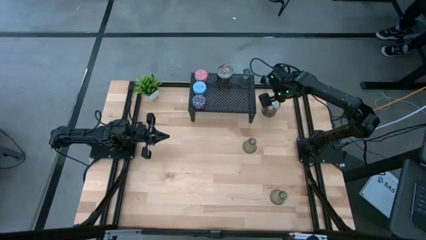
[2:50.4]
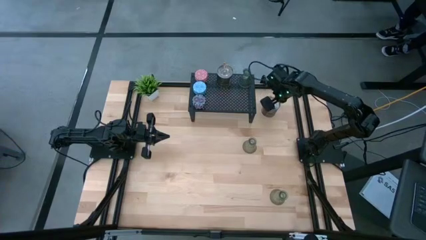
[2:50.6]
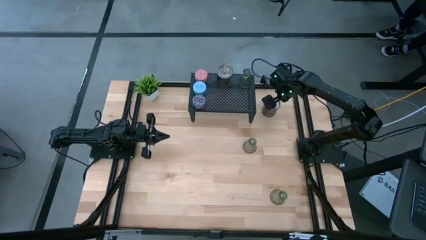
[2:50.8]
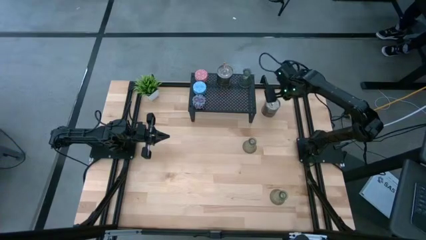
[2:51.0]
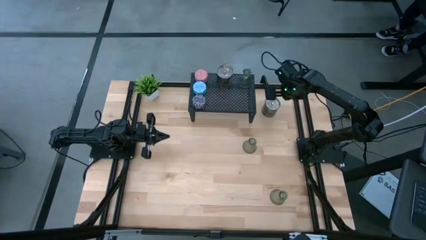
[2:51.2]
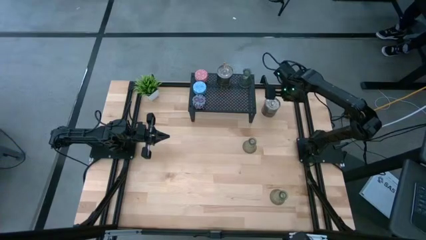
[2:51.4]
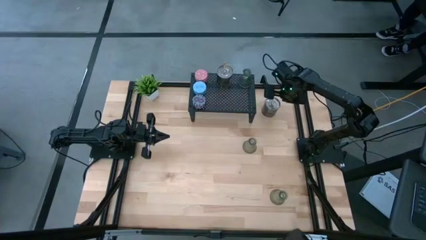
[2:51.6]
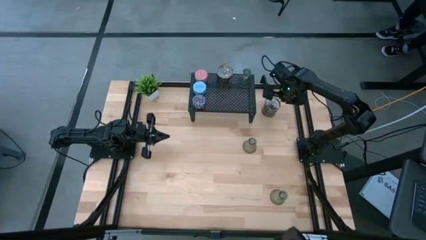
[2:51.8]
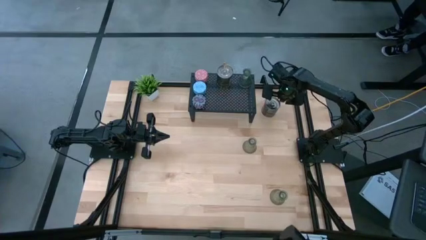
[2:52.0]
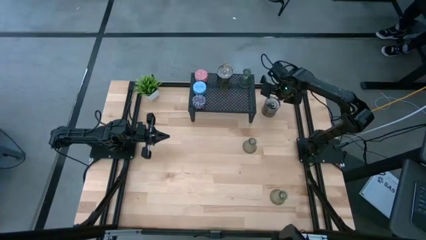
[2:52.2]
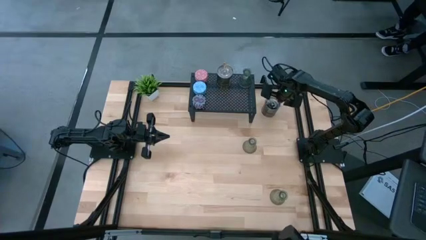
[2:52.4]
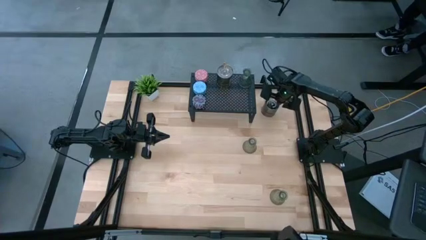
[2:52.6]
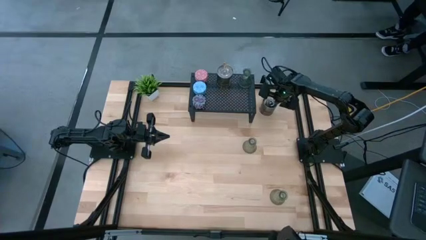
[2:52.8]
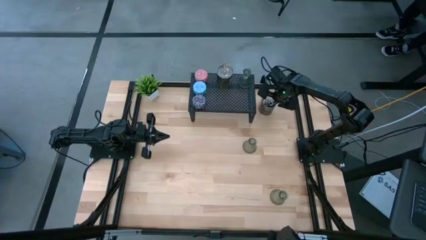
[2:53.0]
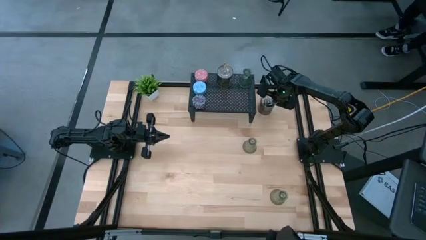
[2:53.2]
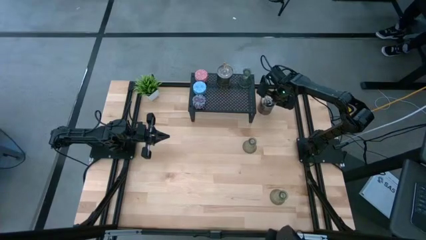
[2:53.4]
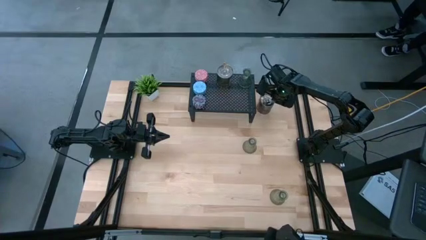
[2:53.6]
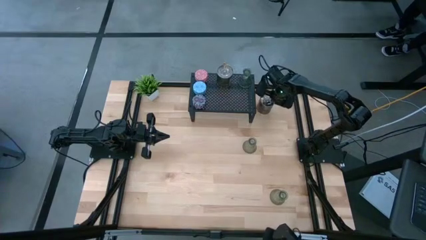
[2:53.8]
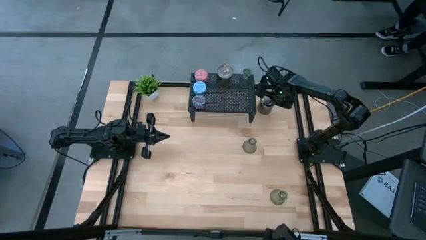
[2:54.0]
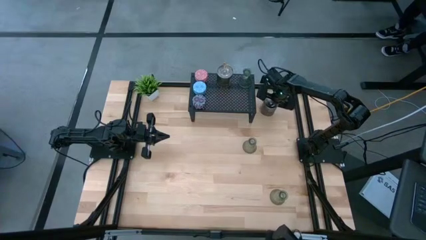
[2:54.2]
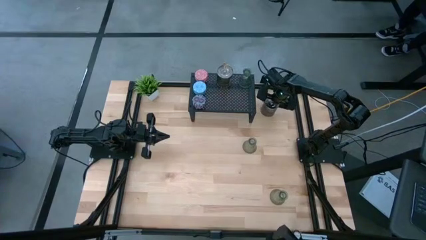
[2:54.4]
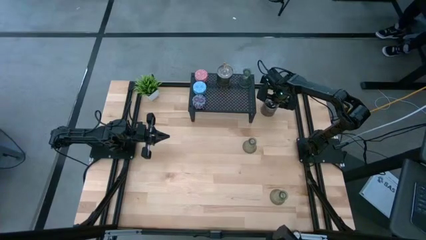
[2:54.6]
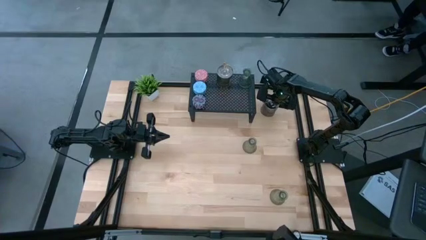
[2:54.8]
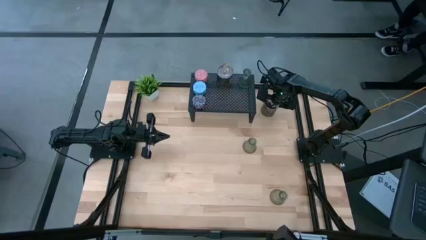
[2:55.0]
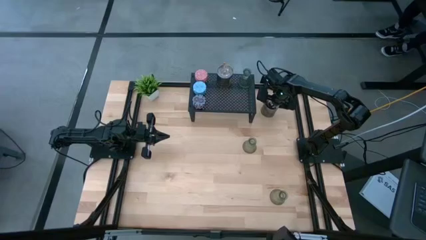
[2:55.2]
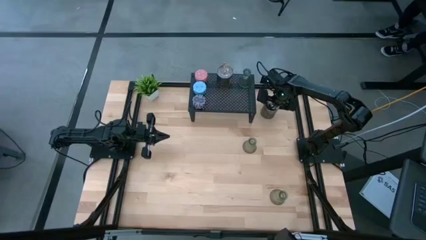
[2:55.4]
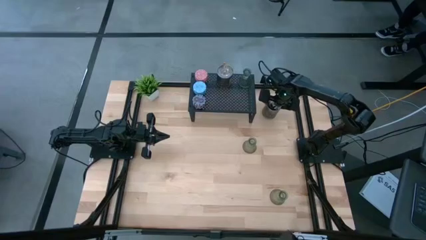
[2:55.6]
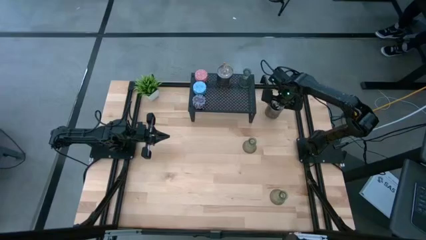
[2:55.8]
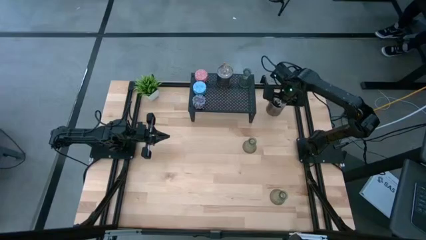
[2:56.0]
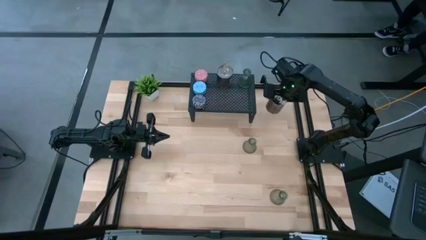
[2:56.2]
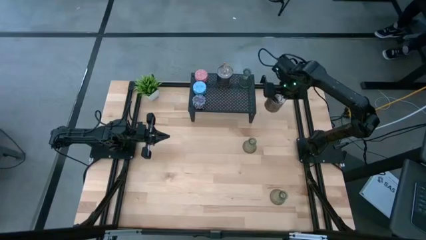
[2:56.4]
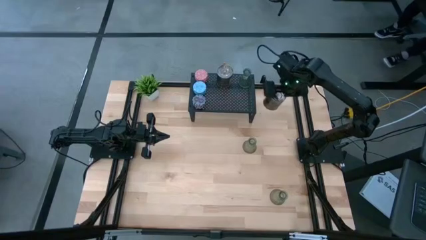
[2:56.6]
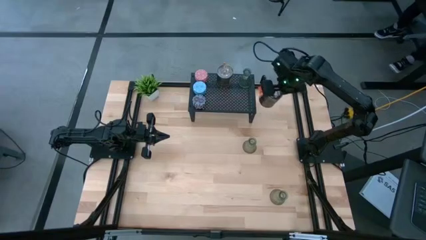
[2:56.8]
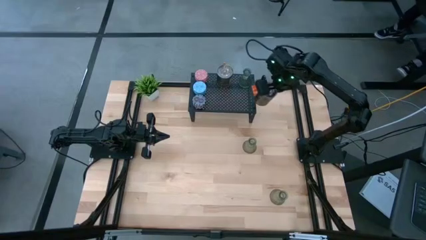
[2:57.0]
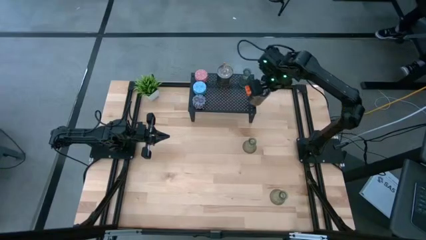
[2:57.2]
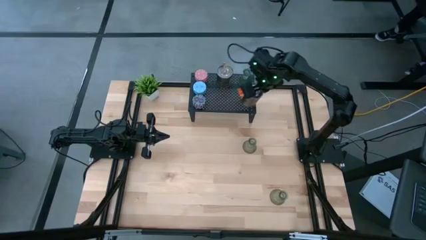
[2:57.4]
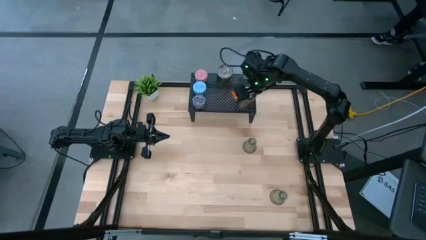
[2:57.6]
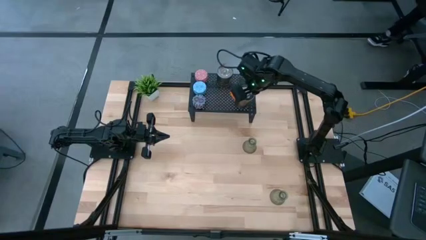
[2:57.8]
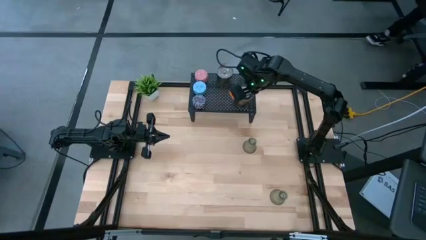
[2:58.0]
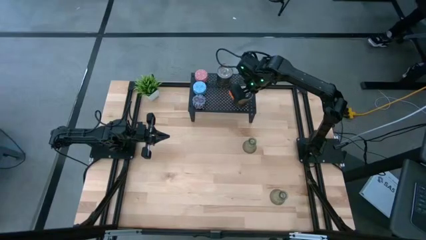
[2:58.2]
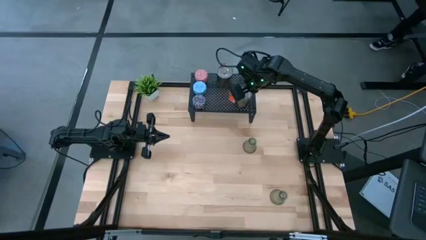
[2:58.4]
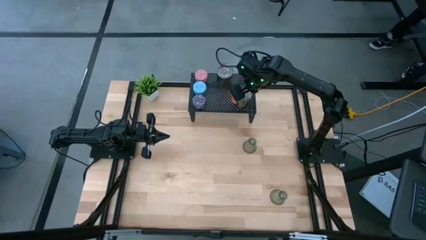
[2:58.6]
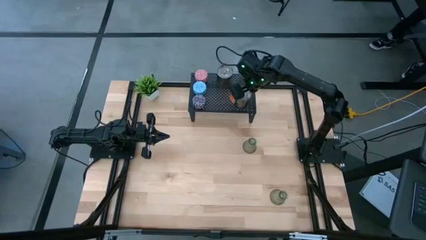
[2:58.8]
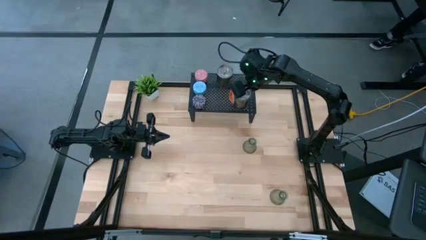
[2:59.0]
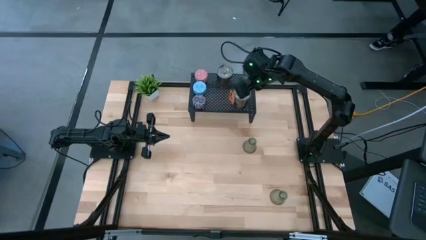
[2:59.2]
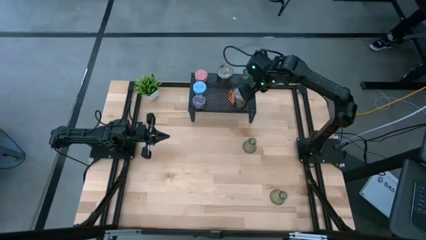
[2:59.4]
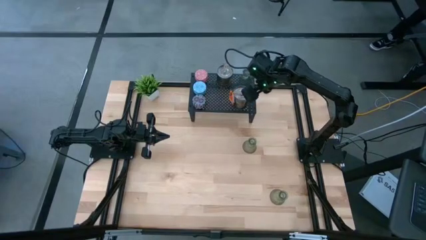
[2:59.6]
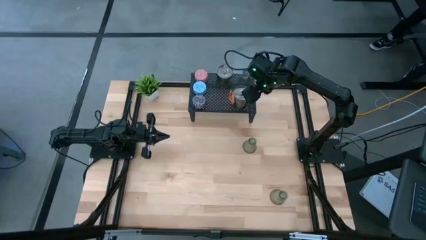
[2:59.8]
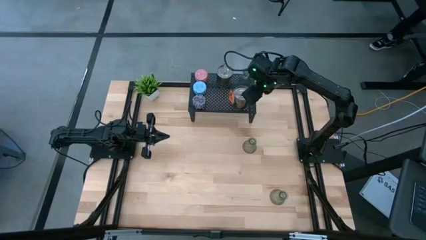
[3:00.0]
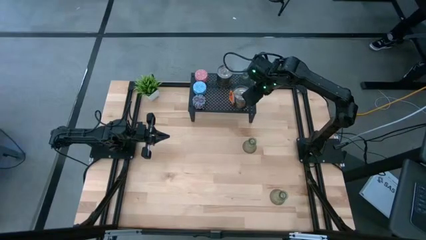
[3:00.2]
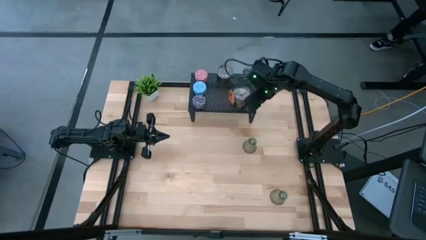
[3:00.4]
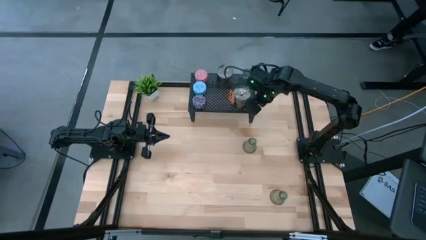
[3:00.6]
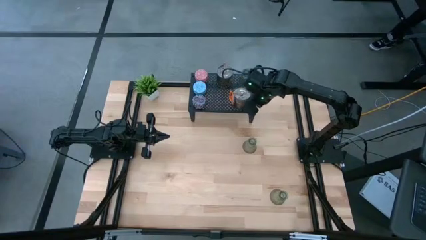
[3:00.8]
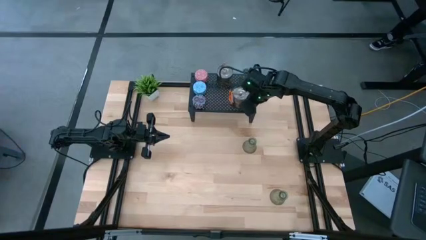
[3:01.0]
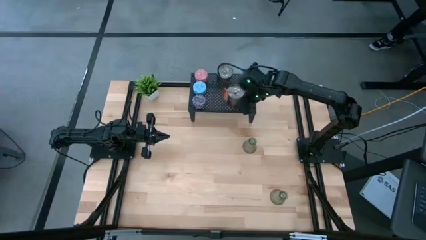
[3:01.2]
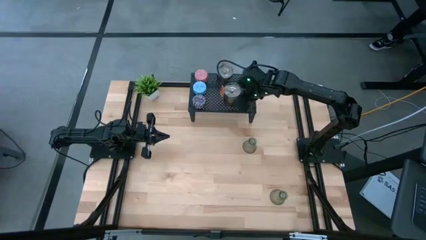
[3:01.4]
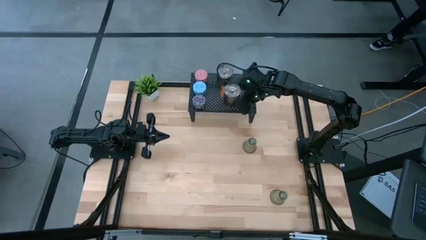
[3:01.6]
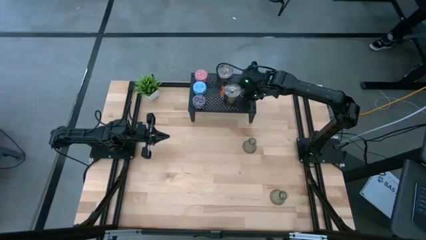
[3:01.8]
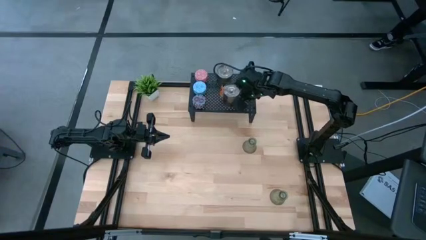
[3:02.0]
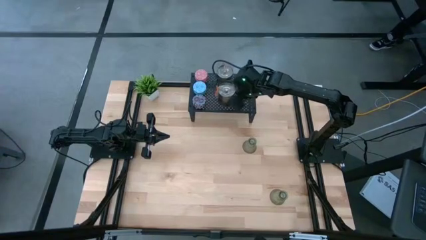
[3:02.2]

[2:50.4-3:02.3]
Task: Pick & Place candle stick holders
Put the silver scented candle on the shelf

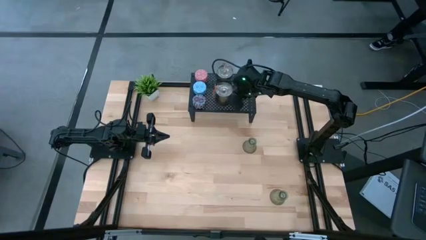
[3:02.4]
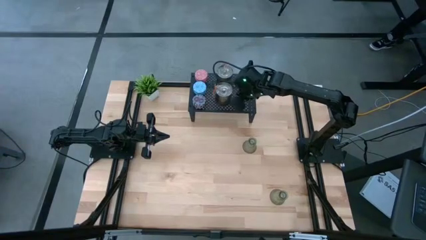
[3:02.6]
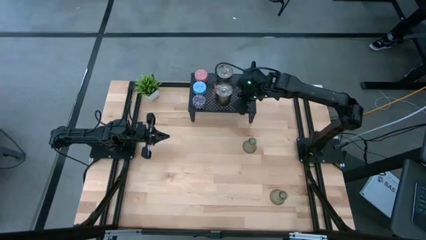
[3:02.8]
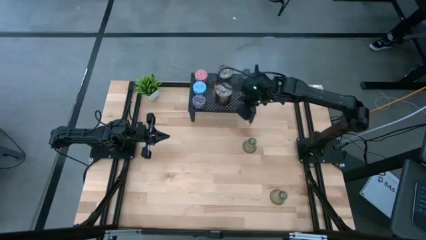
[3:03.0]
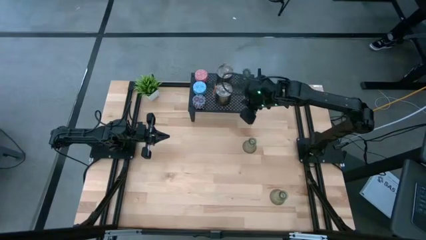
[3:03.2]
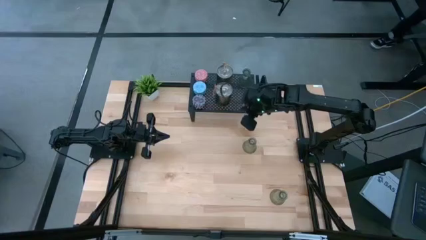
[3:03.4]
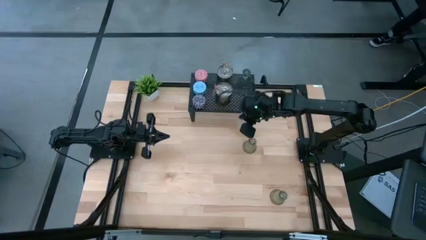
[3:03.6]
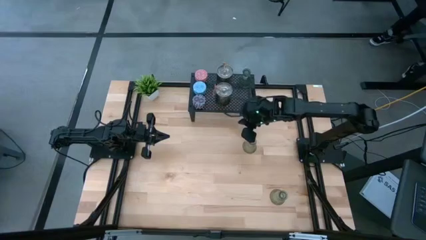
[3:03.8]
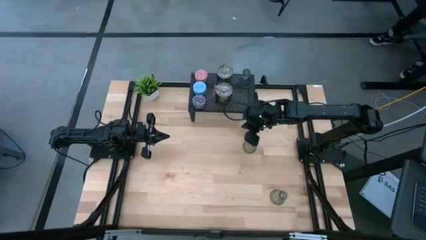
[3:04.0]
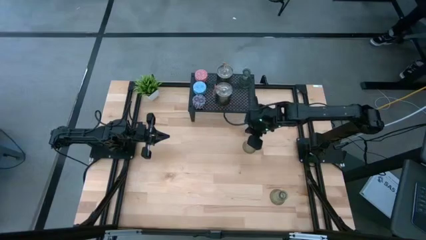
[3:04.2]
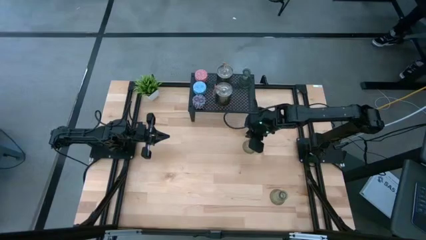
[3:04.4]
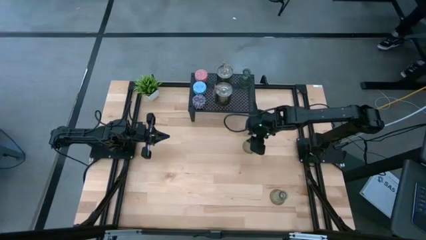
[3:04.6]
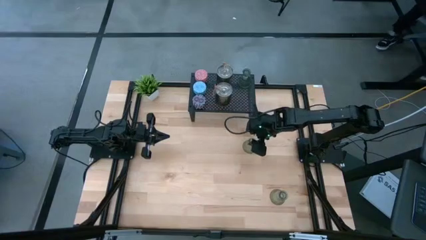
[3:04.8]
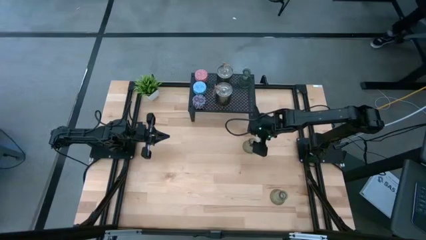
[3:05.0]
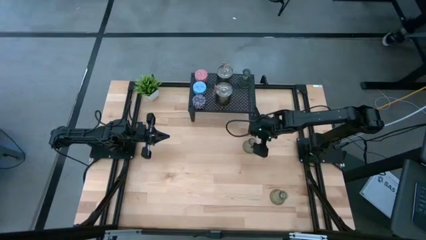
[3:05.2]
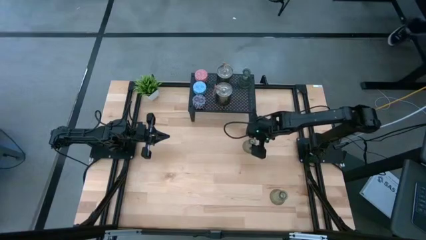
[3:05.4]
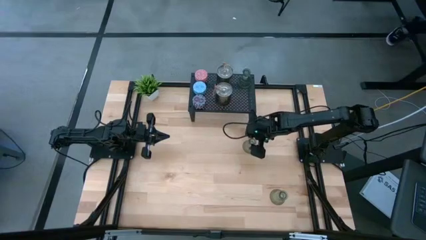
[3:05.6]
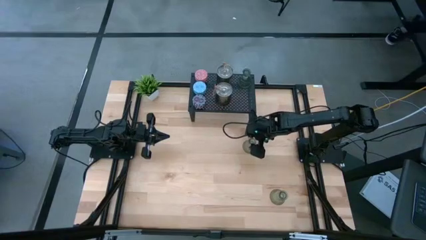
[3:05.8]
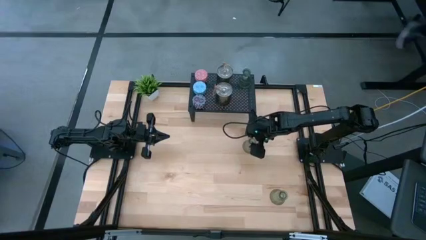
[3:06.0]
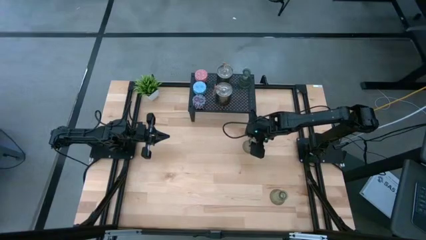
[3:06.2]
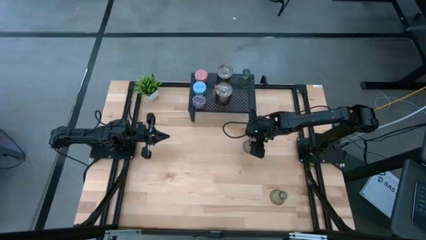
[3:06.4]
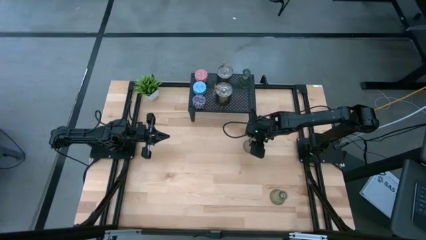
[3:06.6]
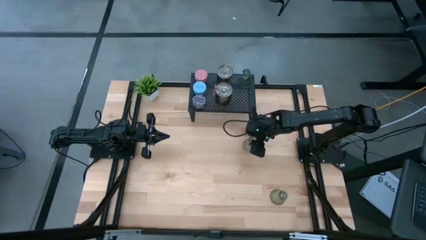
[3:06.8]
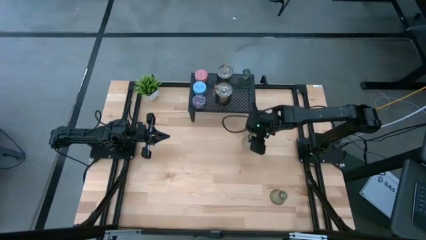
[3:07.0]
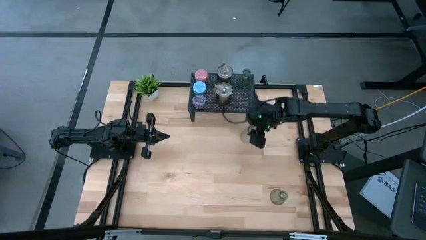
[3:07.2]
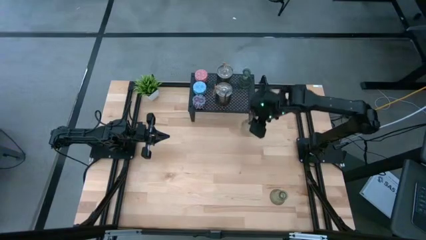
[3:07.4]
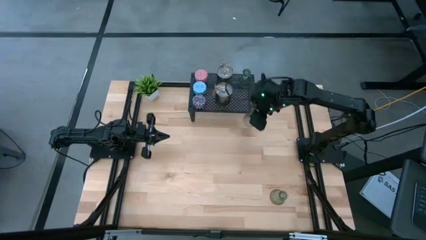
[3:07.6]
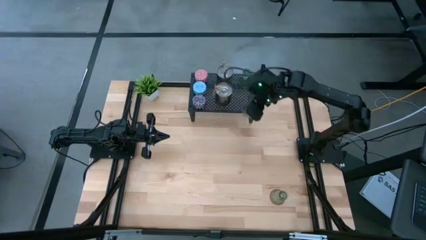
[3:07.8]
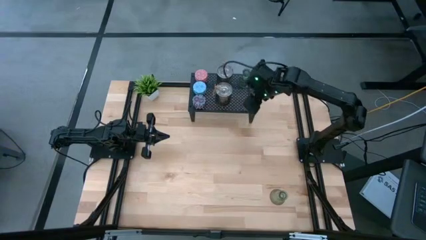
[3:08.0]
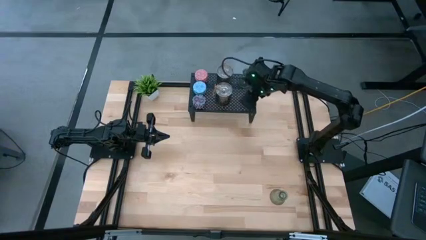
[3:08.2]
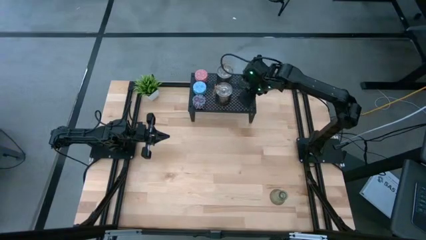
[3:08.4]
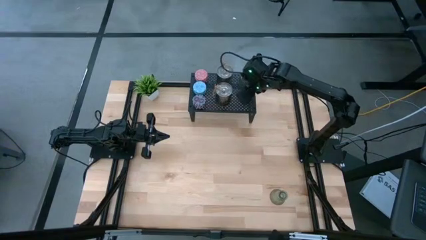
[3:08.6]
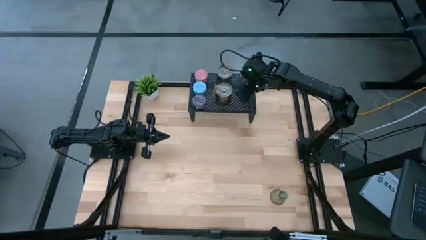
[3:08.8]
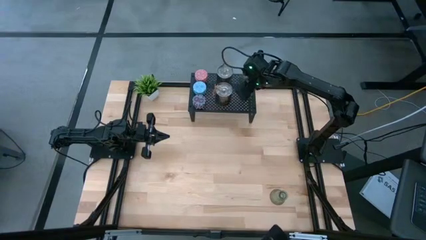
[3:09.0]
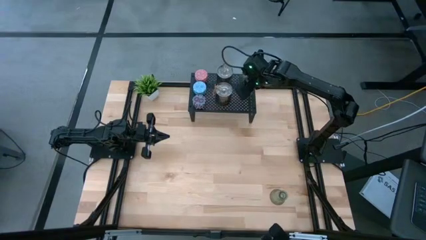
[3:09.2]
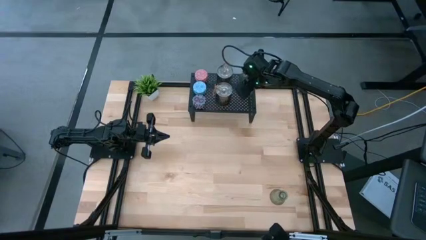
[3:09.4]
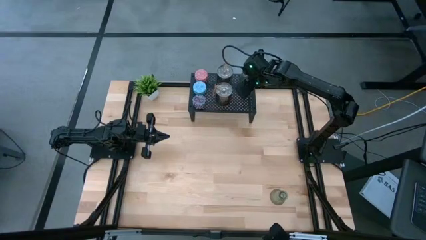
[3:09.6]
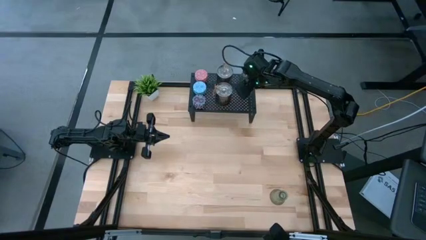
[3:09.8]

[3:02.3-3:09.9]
Put the top green candle holder on the shelf
